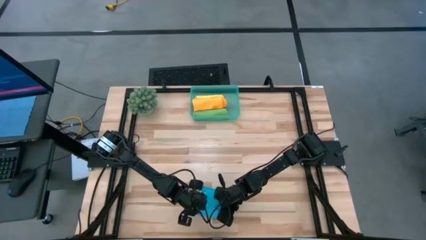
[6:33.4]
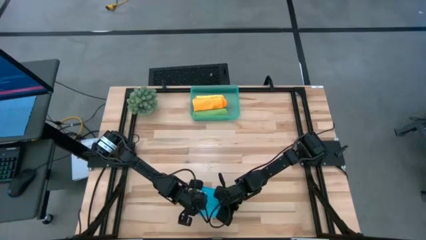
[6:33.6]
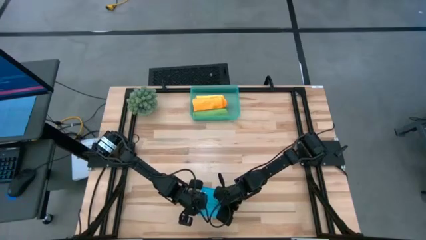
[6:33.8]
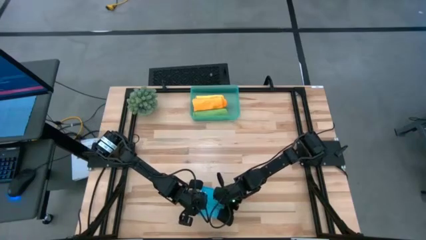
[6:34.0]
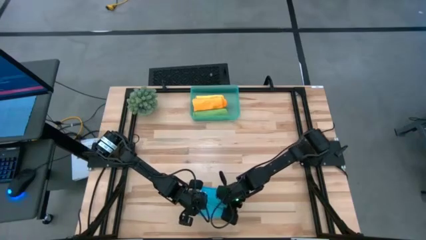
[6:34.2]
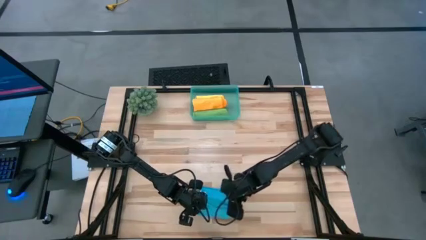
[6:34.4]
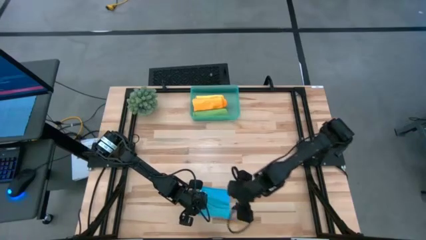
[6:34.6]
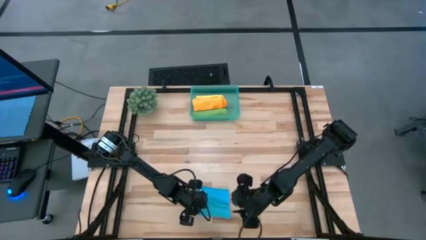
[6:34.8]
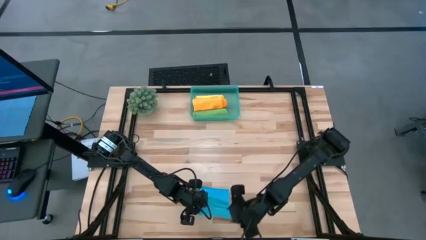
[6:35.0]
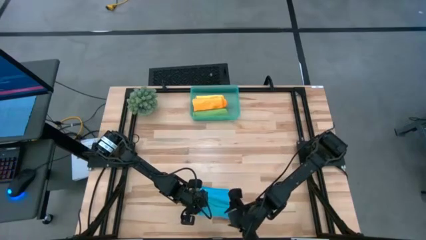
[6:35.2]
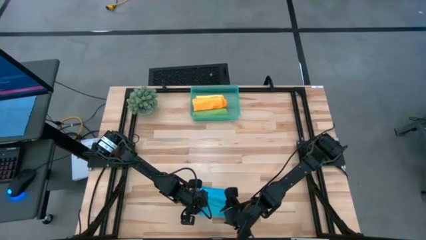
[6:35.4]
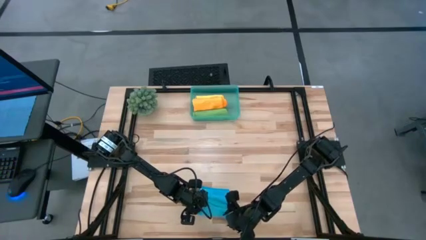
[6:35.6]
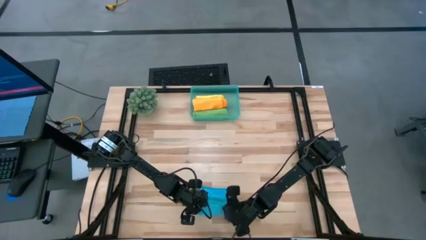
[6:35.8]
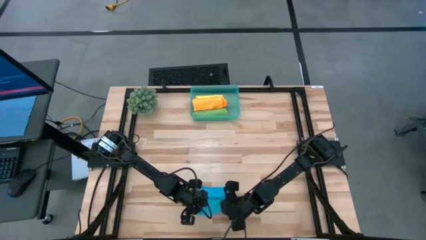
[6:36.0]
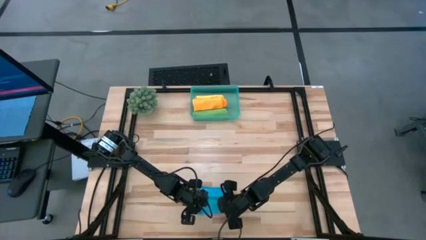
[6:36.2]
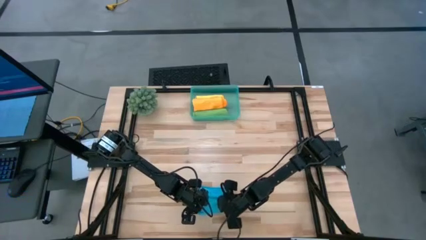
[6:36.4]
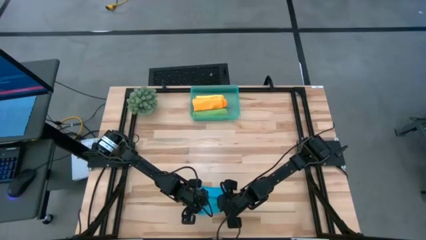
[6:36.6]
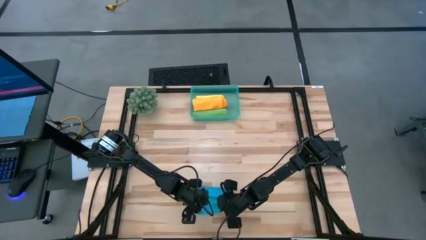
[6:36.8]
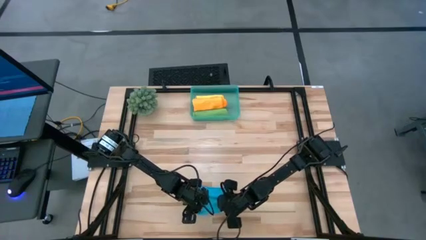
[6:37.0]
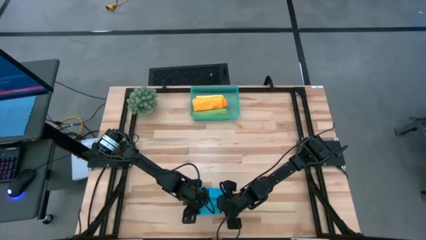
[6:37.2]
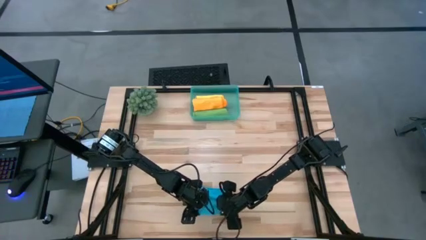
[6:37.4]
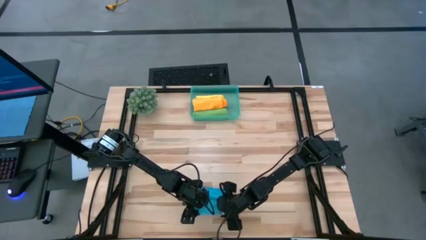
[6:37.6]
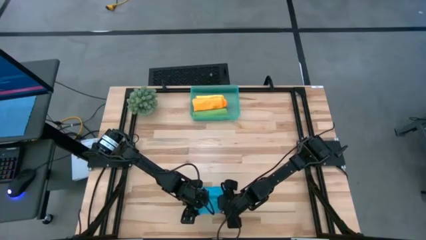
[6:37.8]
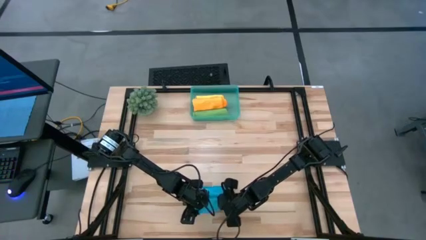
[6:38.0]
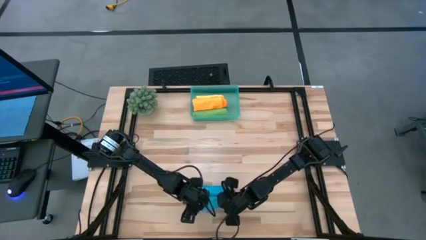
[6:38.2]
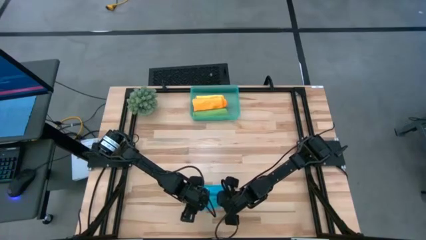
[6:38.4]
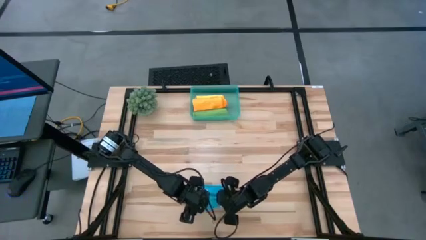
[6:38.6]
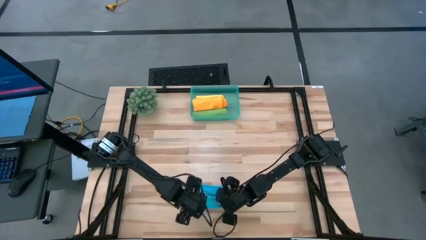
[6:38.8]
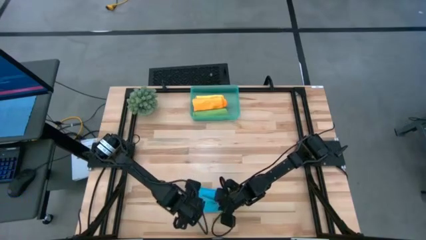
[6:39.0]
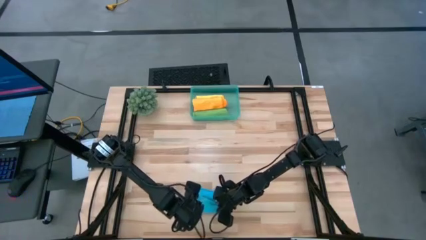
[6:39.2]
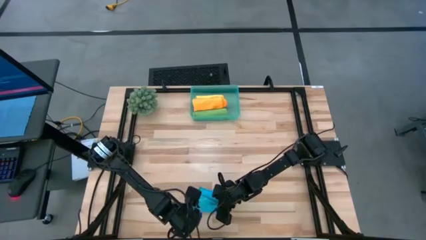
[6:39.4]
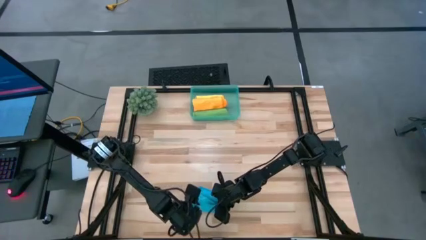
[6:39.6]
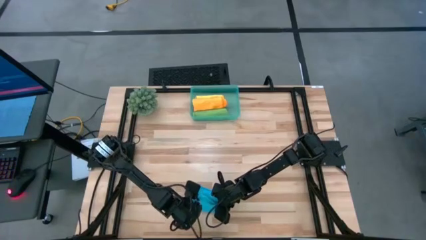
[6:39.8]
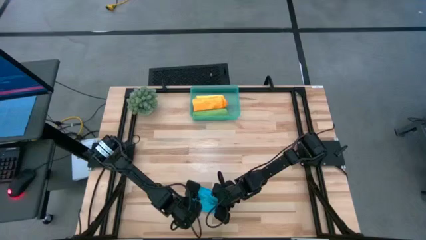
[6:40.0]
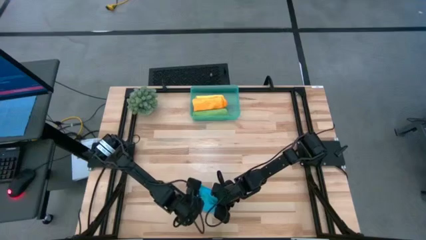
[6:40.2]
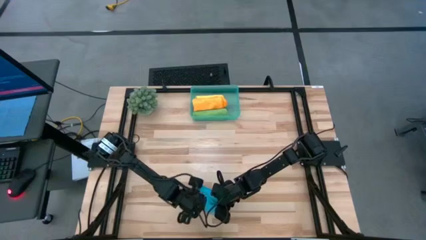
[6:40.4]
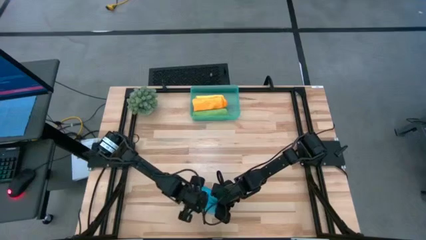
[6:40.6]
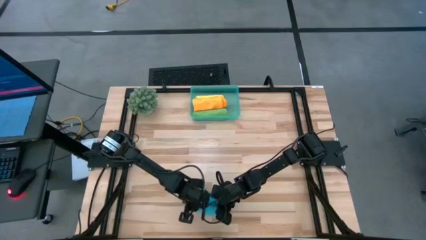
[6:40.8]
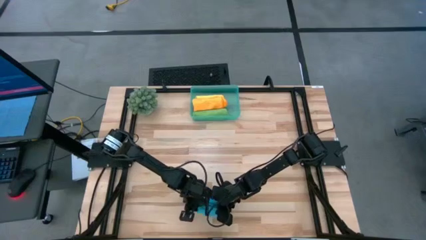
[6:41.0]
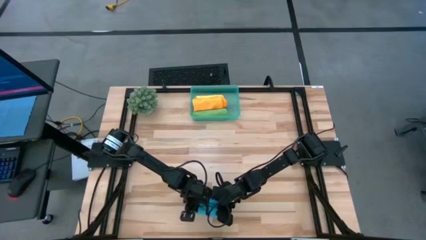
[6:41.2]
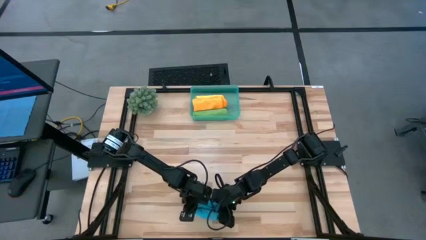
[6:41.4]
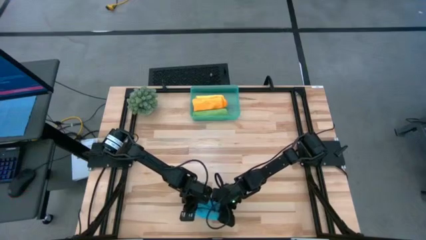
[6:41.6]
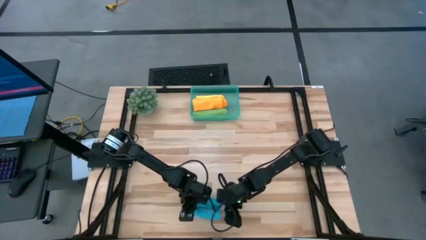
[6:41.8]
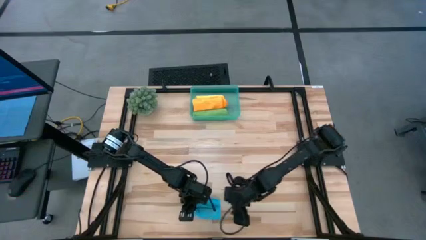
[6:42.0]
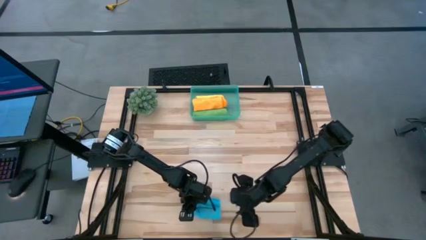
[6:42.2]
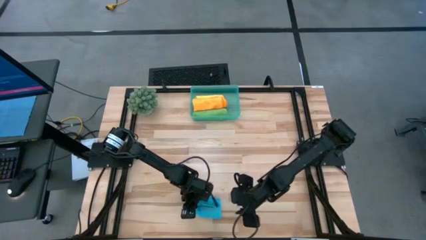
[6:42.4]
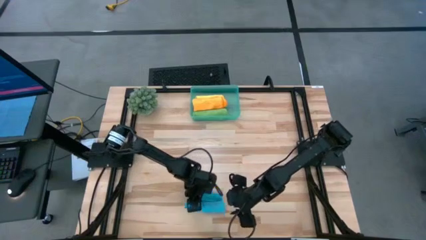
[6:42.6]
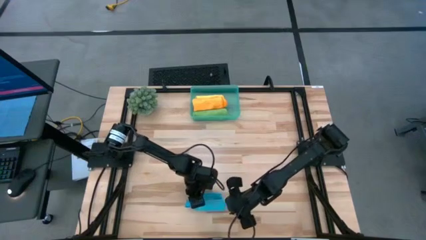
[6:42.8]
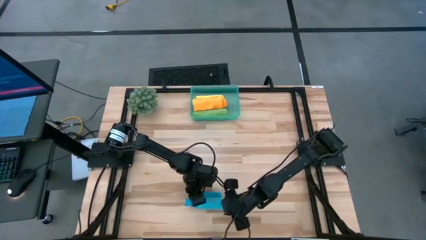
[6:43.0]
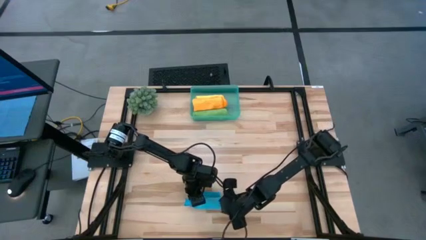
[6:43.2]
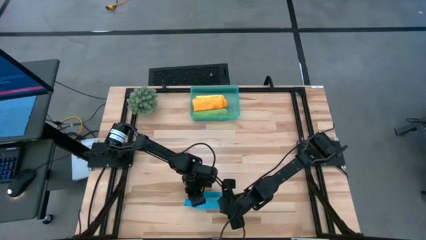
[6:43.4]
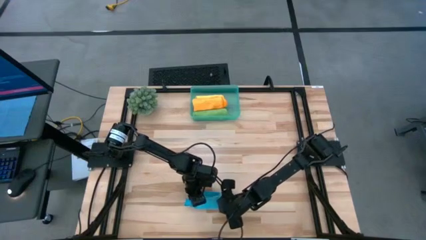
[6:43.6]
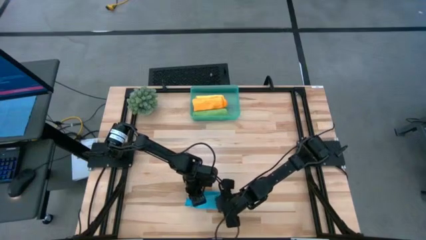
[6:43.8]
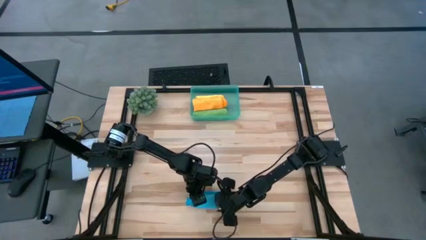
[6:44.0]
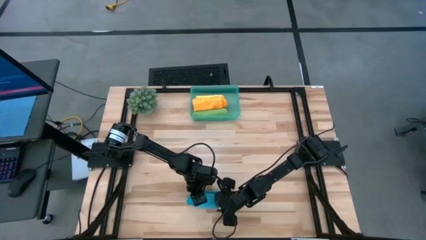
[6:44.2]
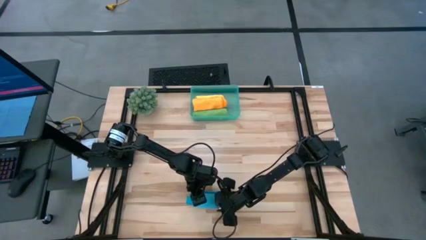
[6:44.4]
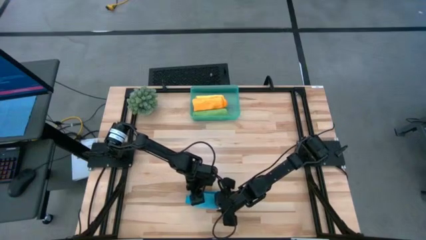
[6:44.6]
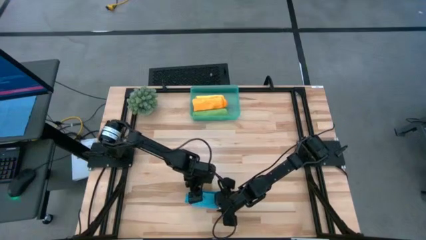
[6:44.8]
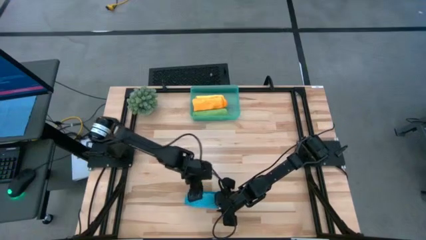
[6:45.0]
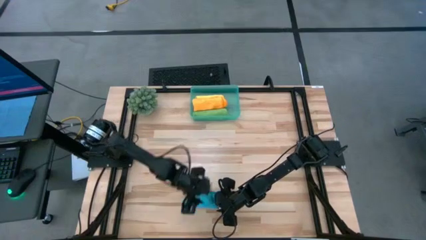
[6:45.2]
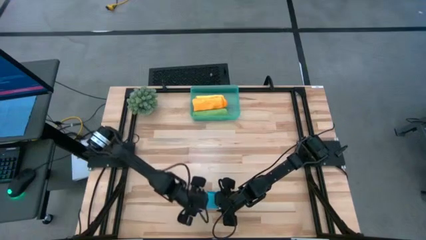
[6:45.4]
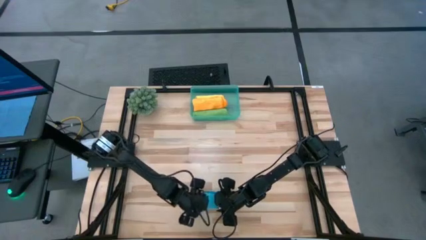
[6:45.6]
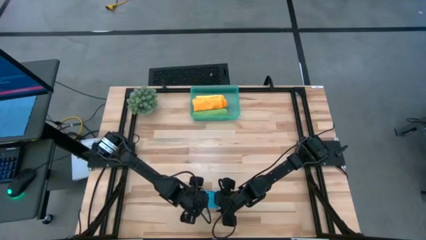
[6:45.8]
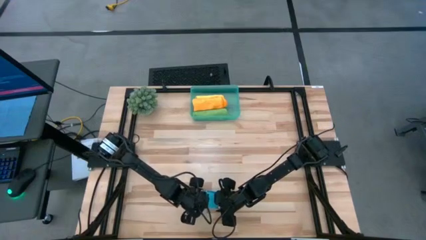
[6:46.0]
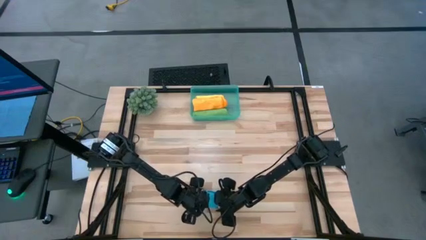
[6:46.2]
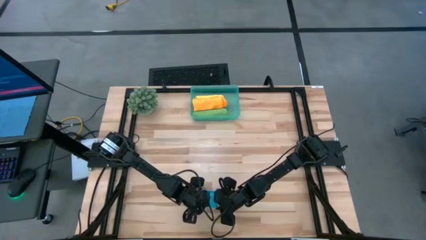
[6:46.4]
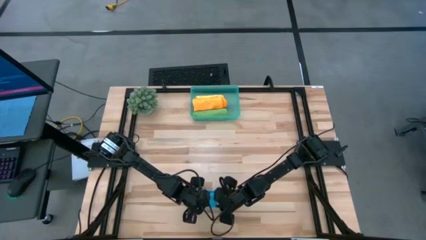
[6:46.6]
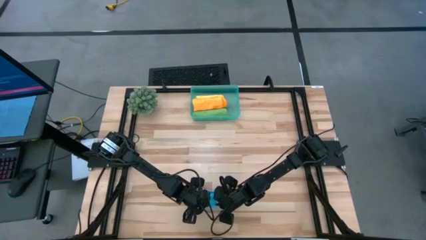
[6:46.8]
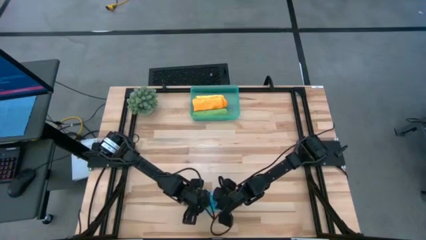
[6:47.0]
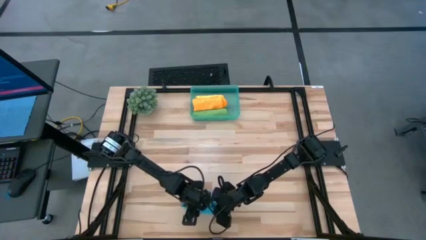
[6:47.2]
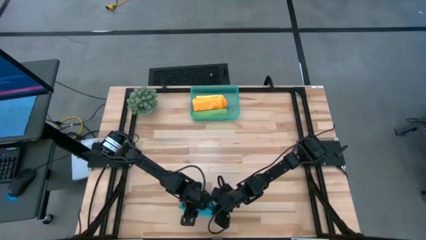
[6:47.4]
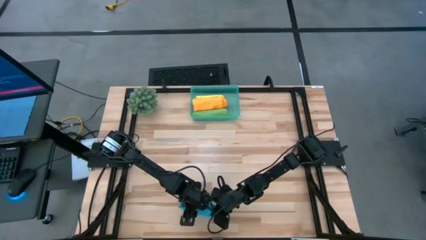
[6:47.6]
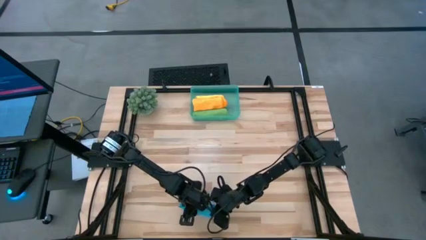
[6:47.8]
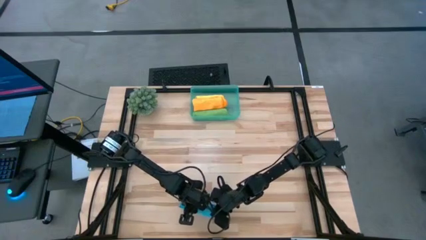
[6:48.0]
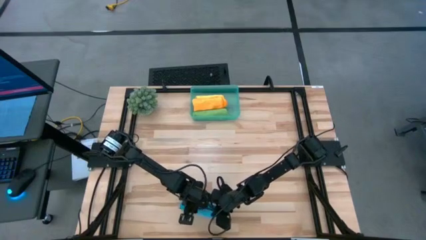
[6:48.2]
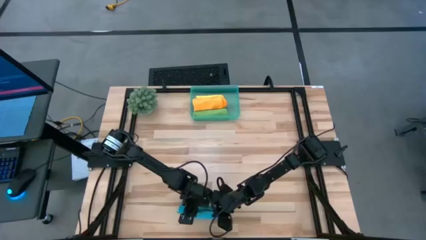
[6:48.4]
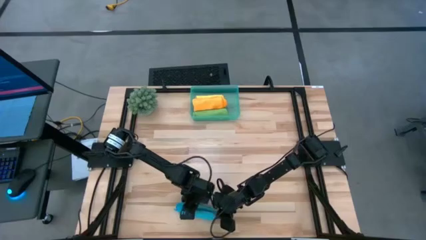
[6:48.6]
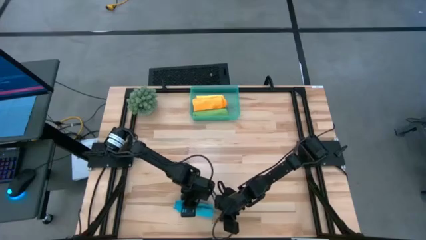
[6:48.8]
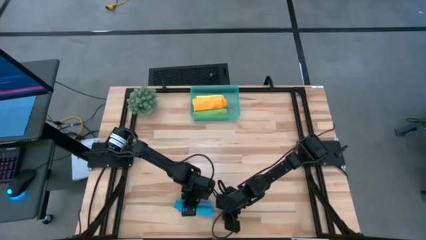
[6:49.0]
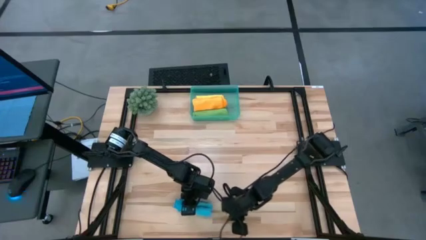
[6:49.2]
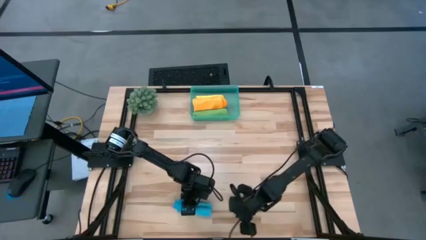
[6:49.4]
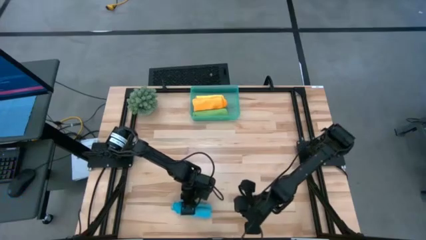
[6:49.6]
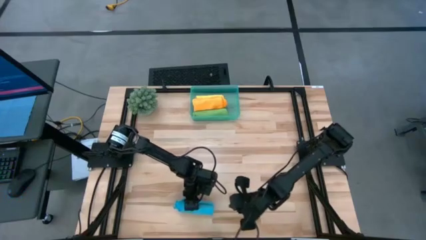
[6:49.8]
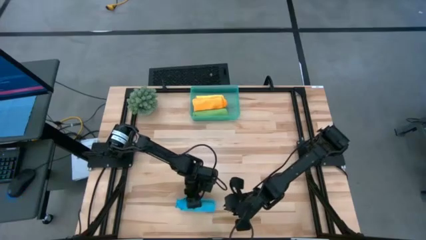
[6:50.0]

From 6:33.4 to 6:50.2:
Task: Roll microfiber towels into tight, uniform cylinder then place into a basket
Roll the blue towel
